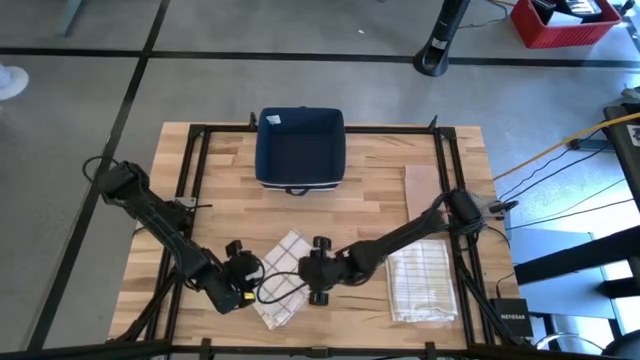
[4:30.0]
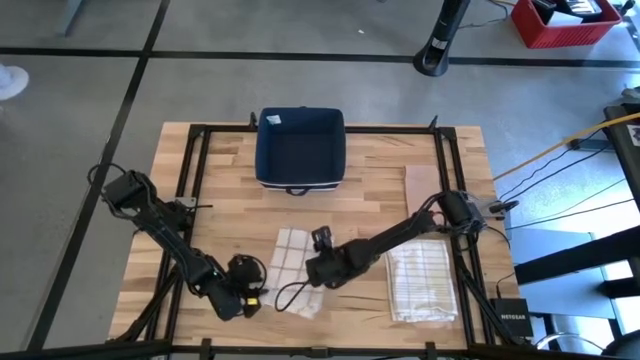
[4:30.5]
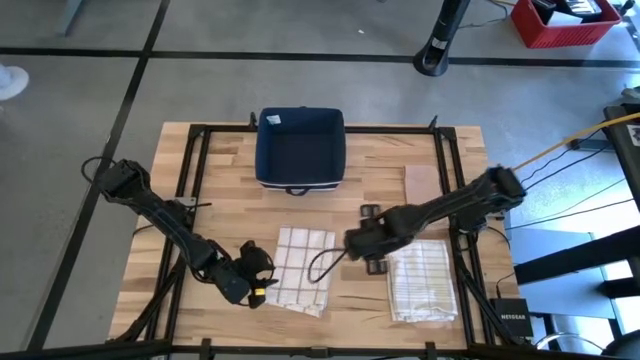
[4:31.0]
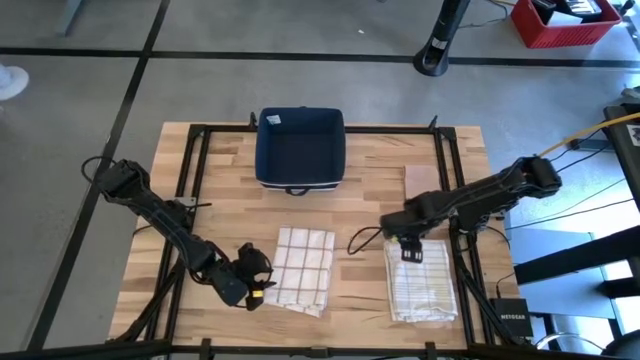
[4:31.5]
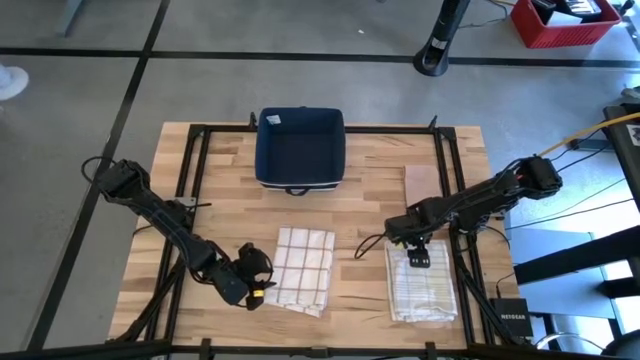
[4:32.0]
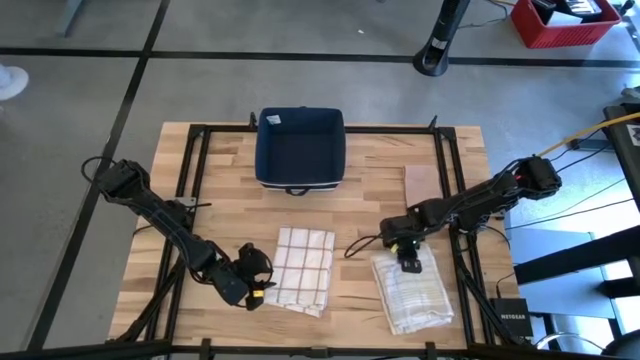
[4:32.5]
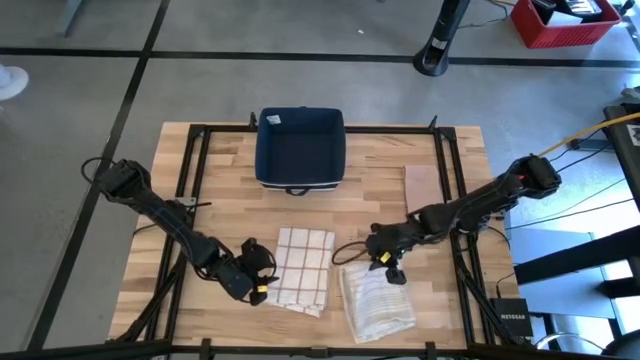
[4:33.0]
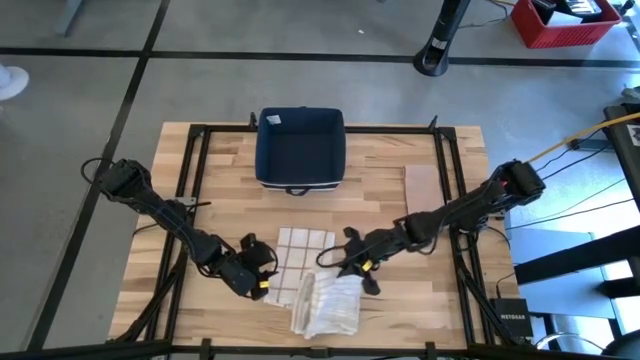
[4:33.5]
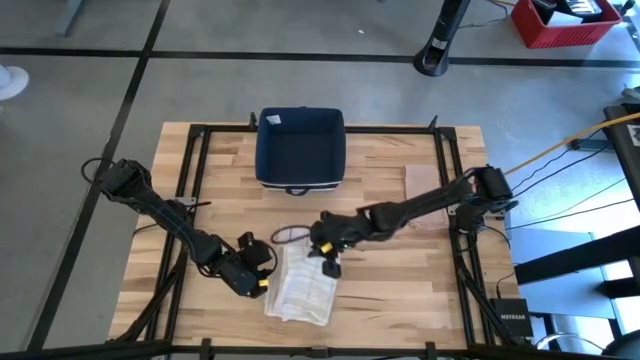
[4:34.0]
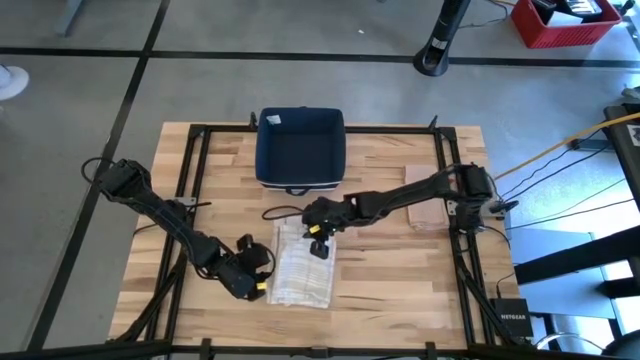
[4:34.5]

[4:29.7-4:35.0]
Task: Fold towel
Stack the white gray patterned towel on the white brown patterned towel

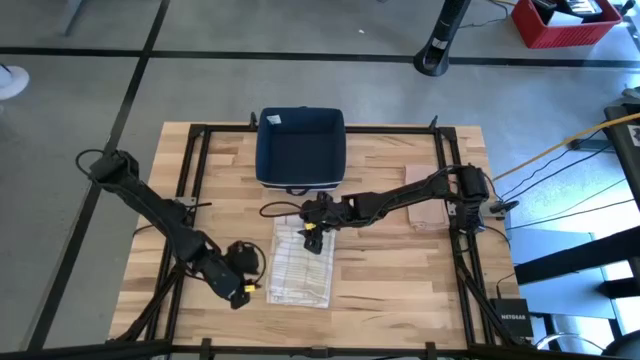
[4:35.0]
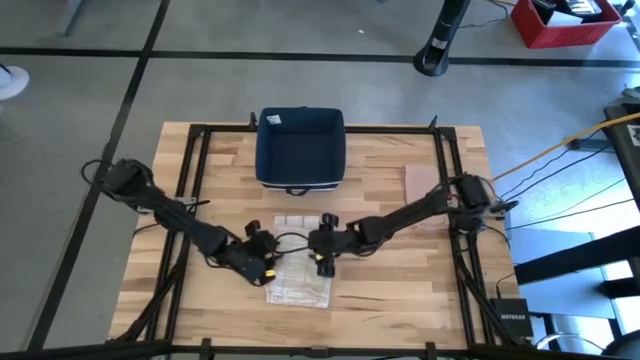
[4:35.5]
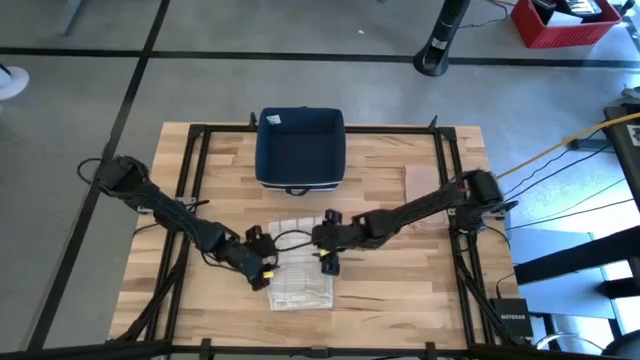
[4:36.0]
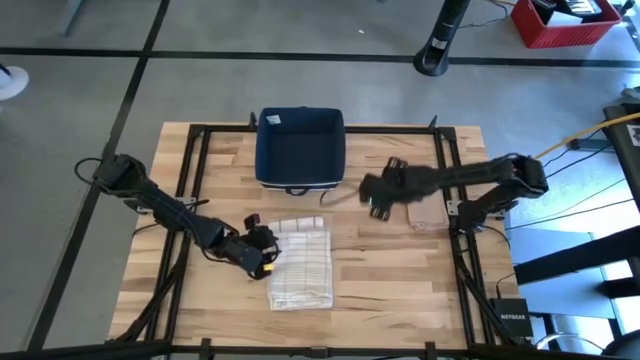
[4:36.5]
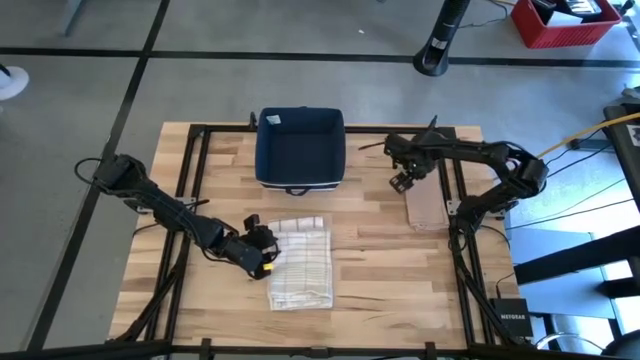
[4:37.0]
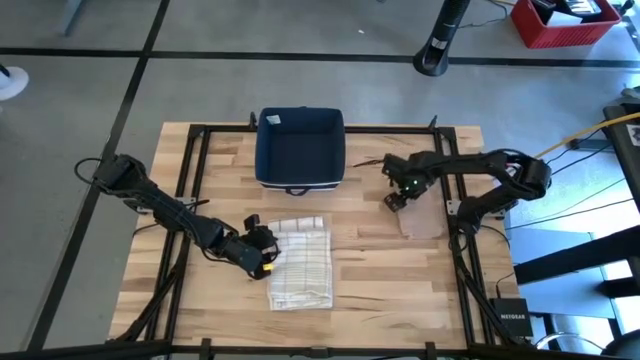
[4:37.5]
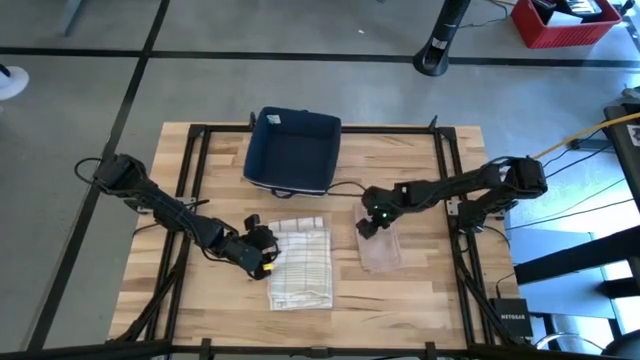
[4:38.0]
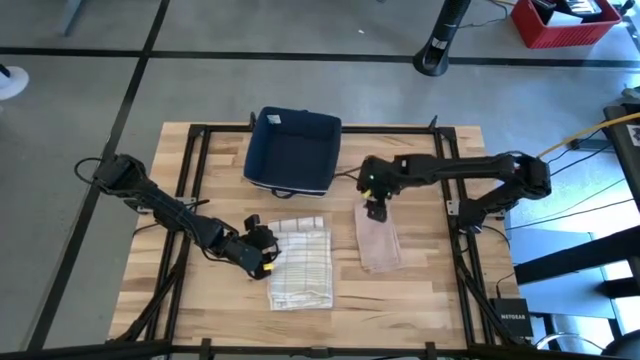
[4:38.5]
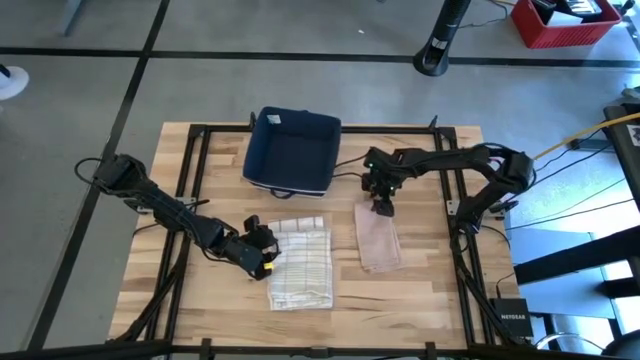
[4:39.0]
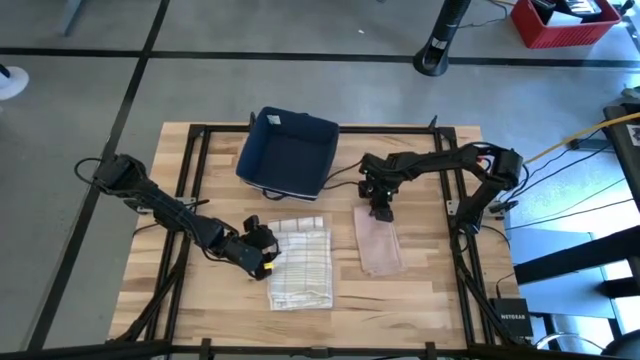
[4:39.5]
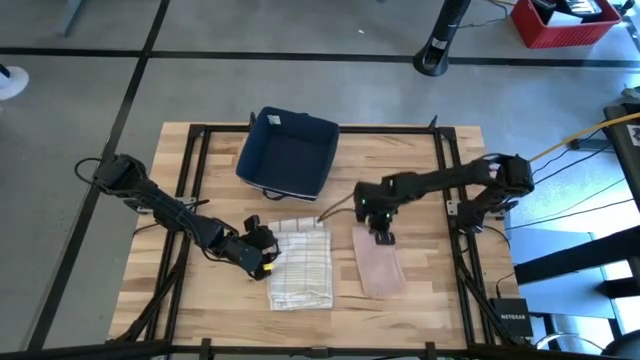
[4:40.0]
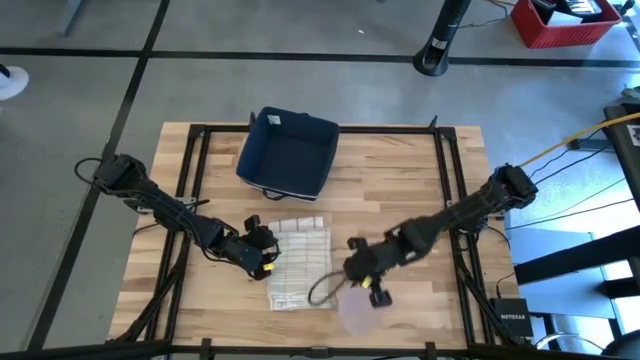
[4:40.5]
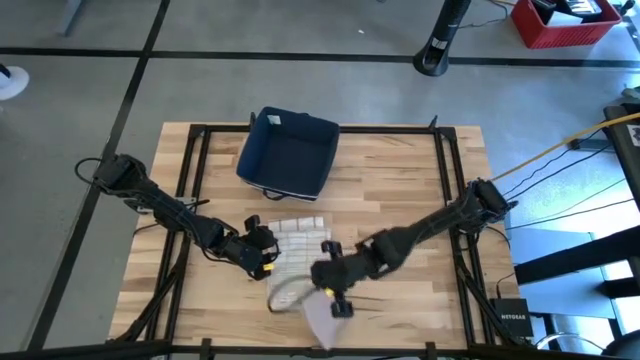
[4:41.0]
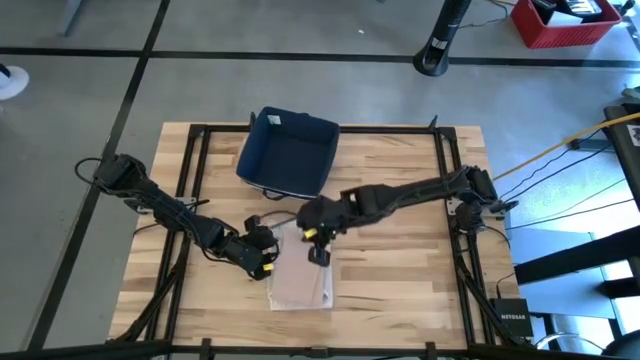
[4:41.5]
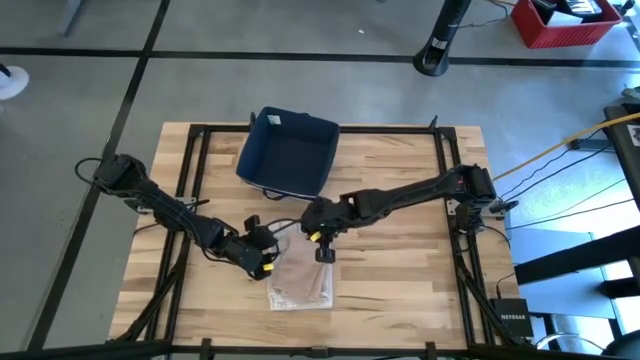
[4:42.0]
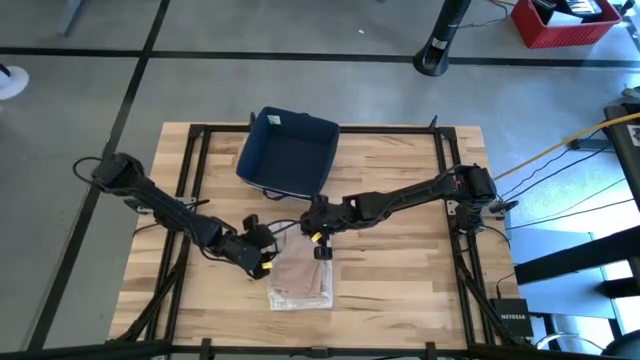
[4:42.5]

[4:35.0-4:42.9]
Stack the pink towel on the gray pattern towel

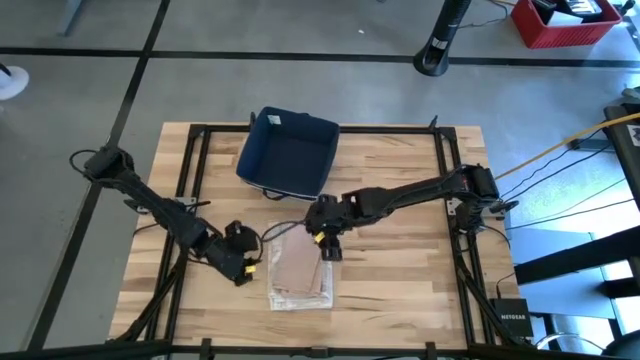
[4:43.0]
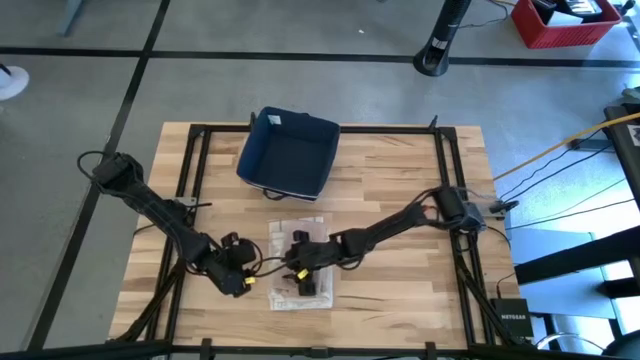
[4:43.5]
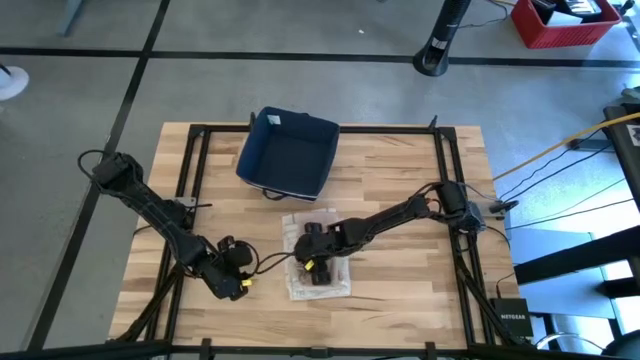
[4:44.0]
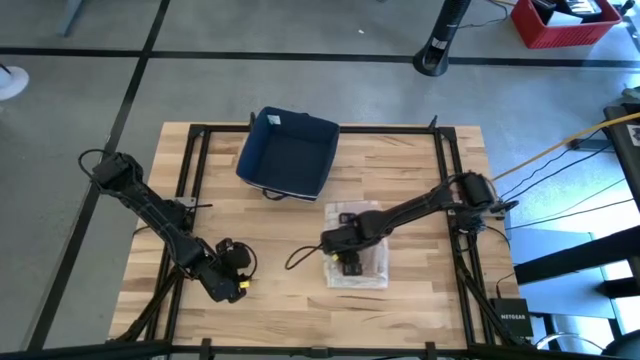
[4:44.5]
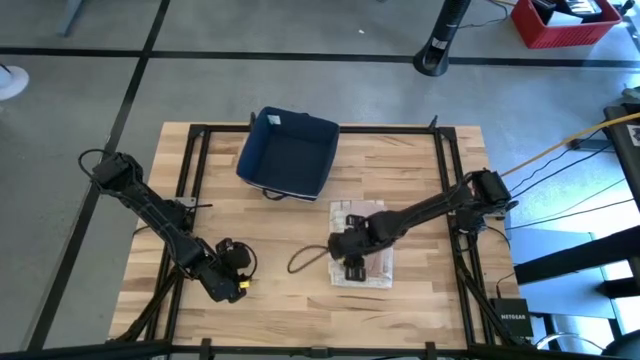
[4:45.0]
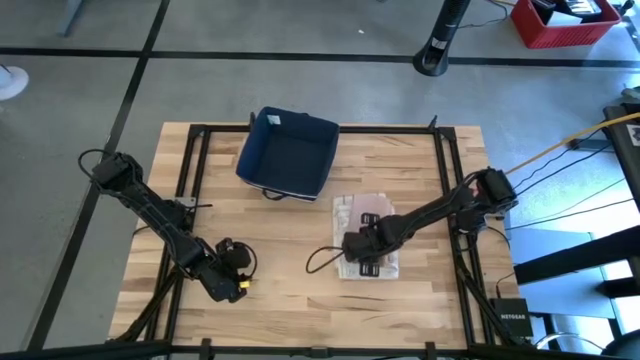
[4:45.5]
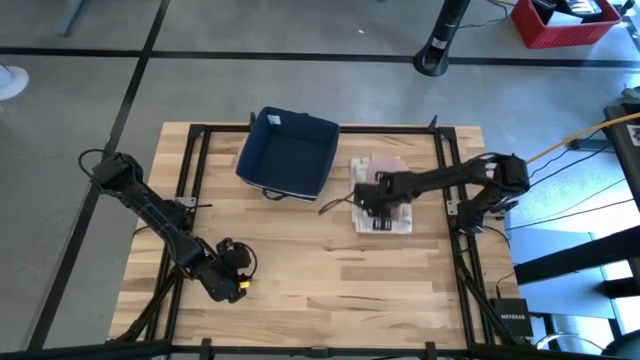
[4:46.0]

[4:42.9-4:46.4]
Move the pile of towels to the top right of the table

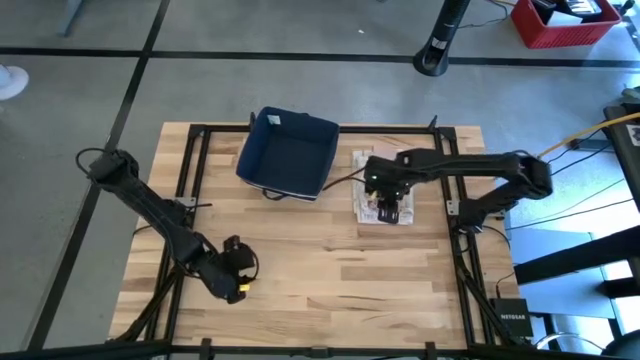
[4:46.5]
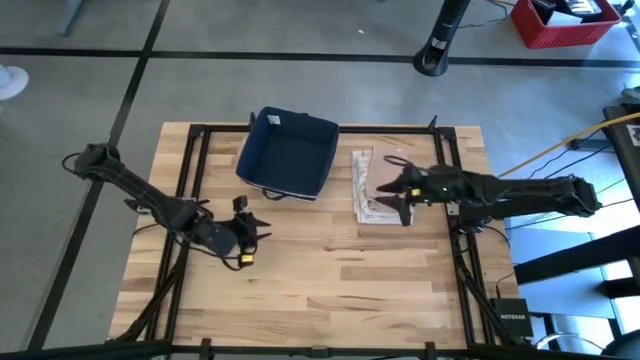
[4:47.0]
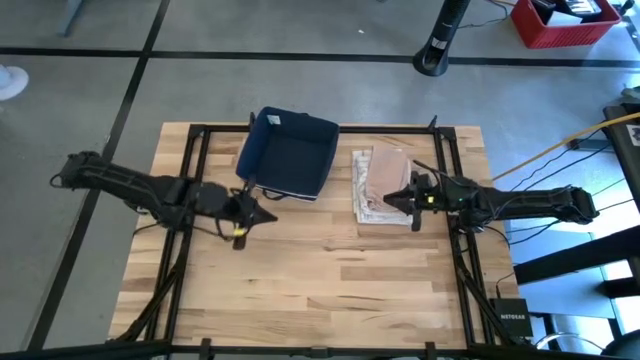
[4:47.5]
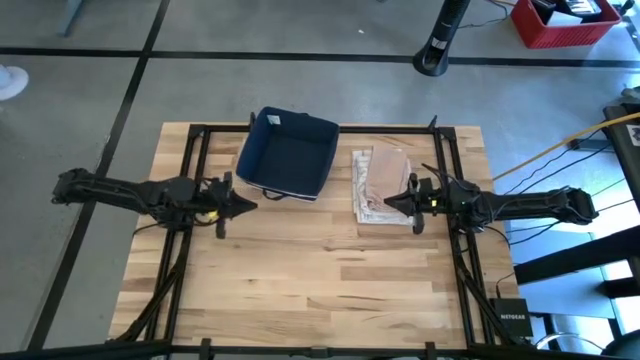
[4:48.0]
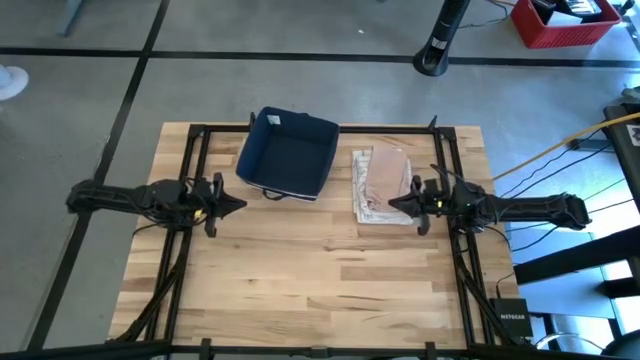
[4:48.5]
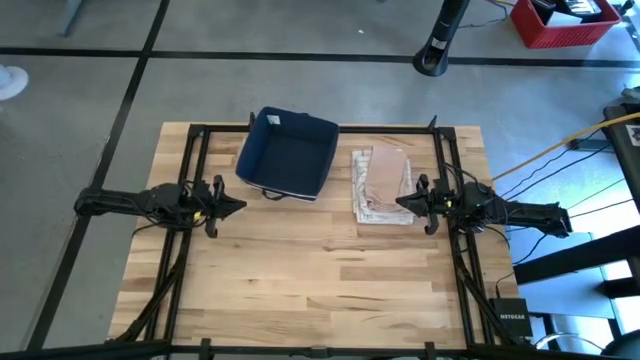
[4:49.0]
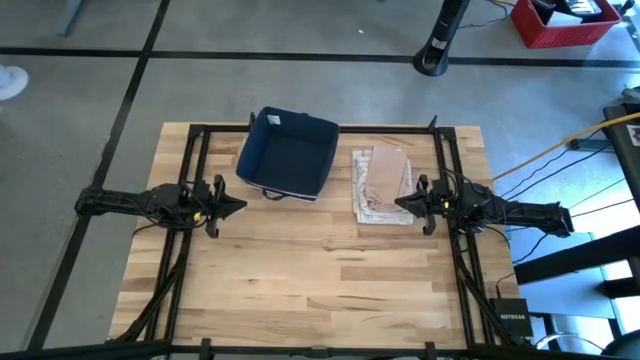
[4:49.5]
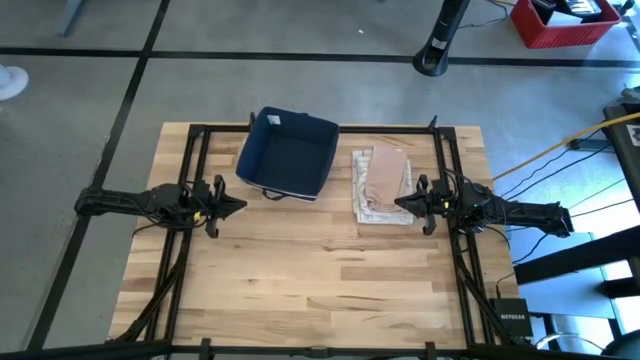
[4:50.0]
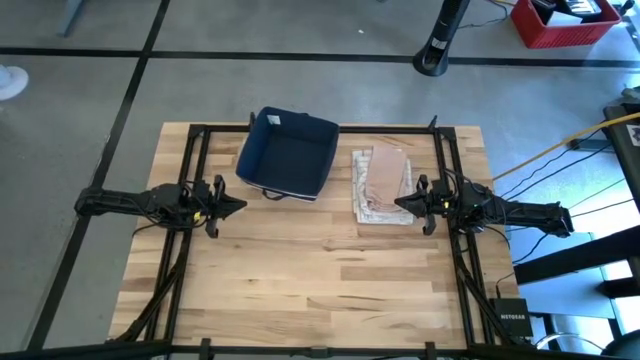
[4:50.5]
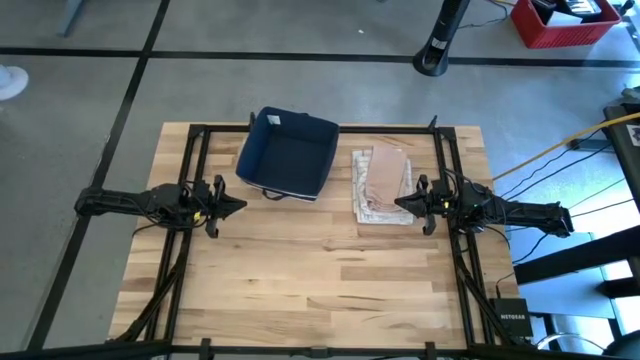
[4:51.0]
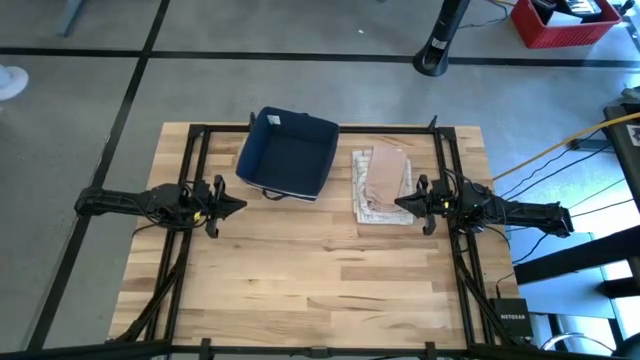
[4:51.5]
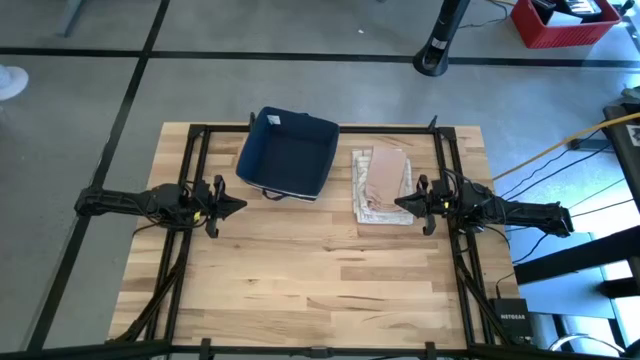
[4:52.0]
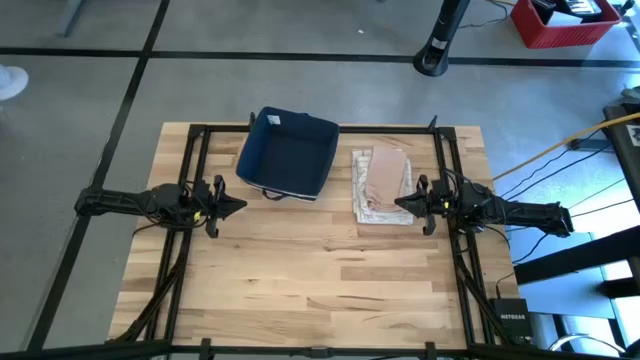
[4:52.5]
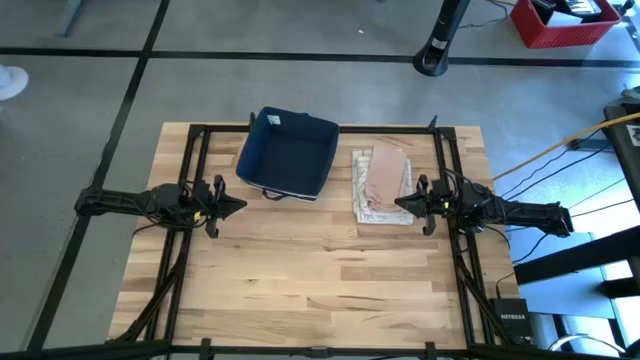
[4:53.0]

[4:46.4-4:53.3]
Return to Home Position
